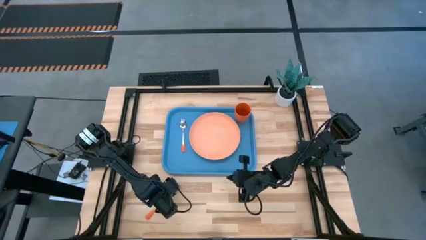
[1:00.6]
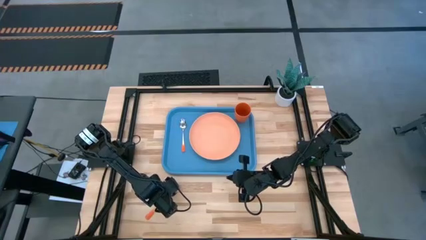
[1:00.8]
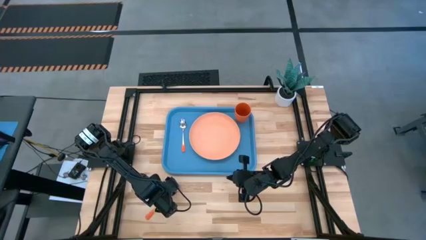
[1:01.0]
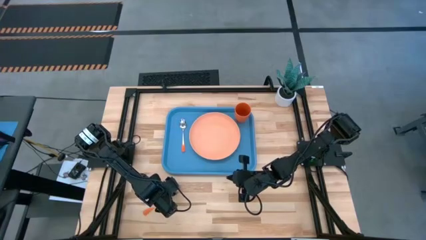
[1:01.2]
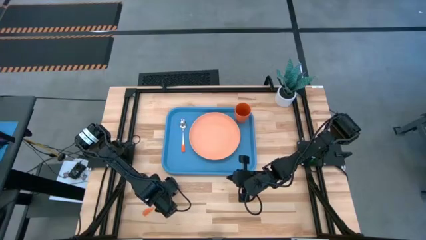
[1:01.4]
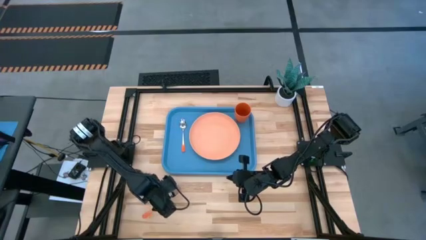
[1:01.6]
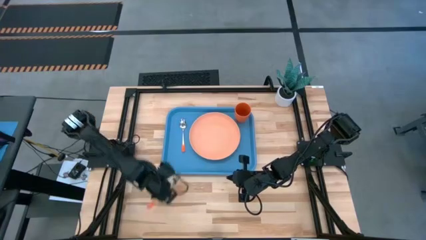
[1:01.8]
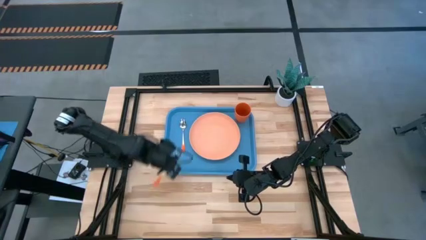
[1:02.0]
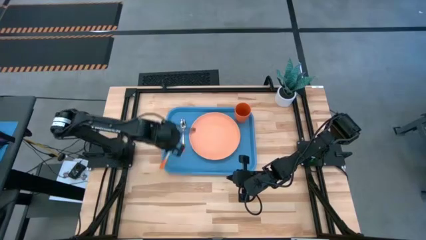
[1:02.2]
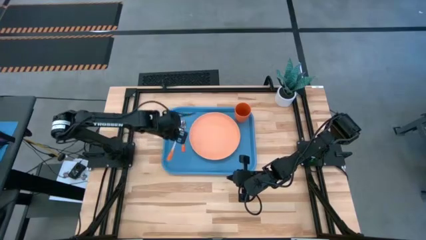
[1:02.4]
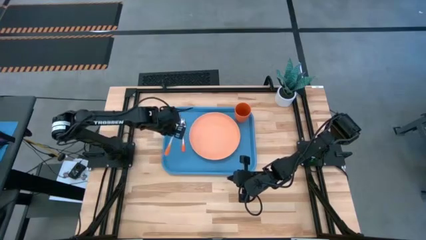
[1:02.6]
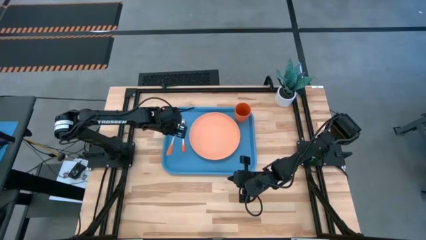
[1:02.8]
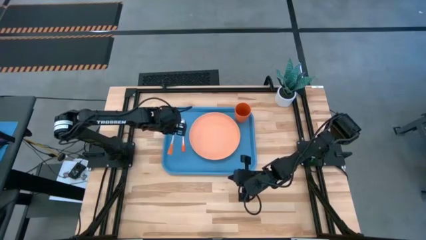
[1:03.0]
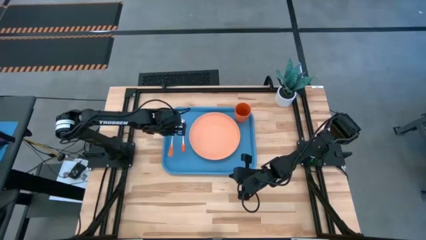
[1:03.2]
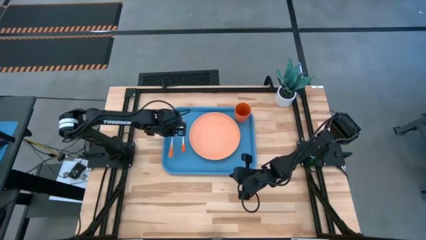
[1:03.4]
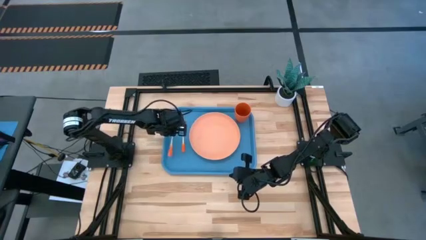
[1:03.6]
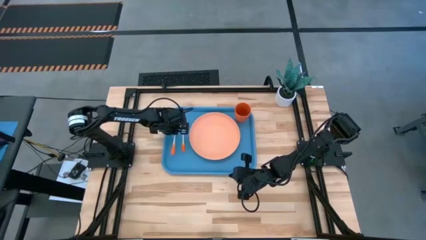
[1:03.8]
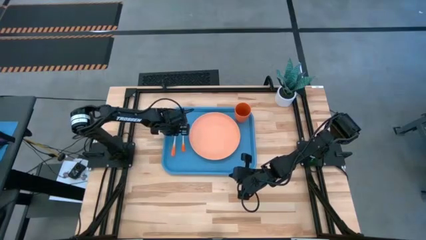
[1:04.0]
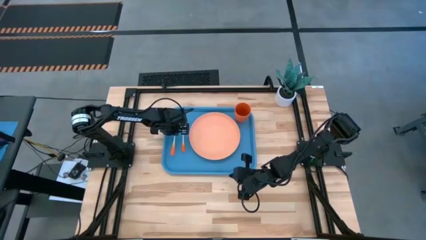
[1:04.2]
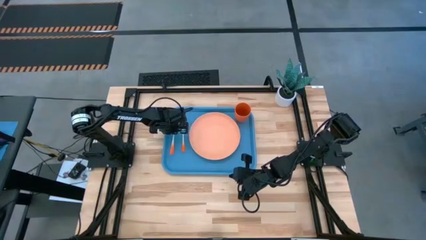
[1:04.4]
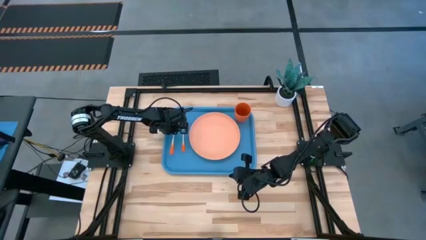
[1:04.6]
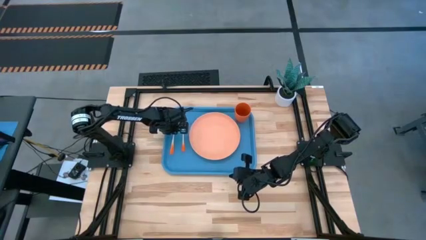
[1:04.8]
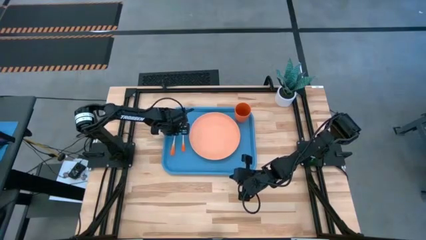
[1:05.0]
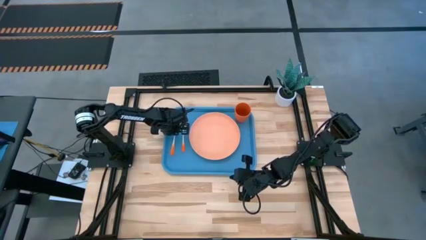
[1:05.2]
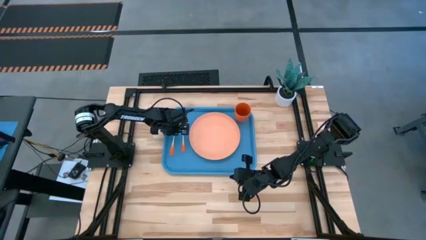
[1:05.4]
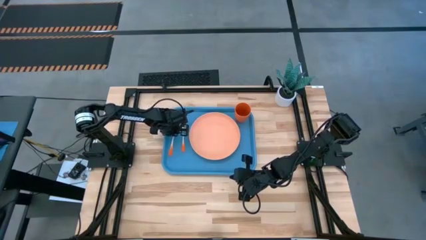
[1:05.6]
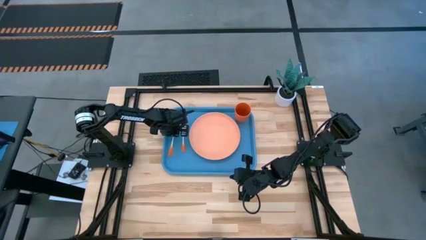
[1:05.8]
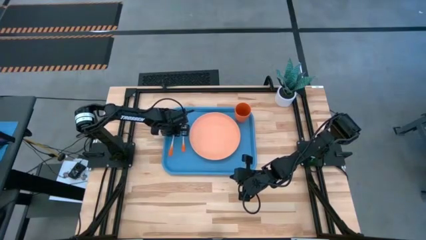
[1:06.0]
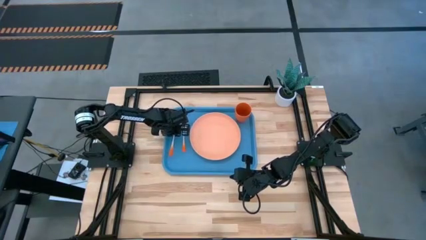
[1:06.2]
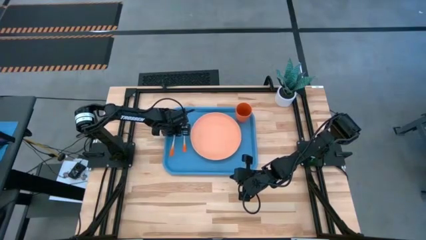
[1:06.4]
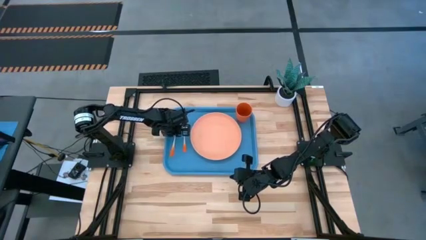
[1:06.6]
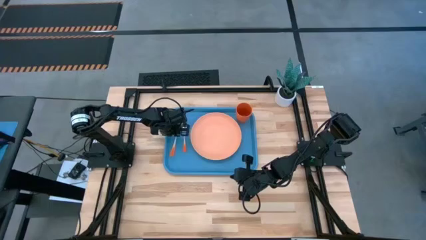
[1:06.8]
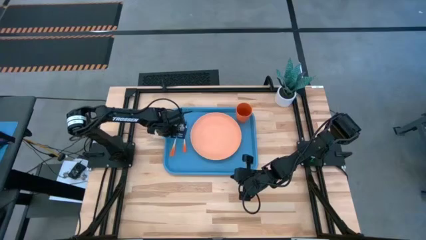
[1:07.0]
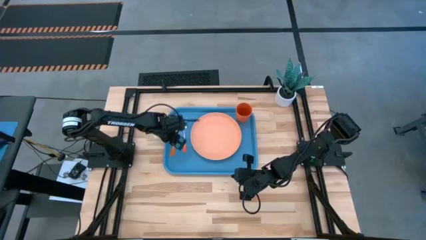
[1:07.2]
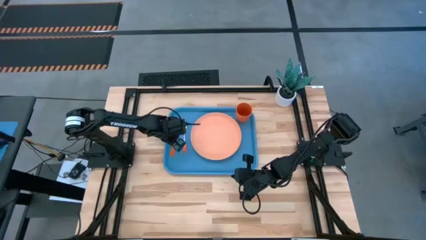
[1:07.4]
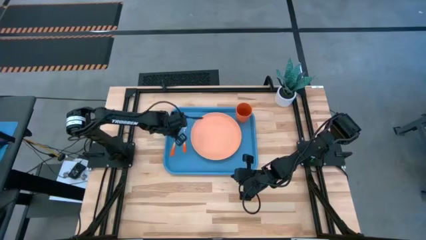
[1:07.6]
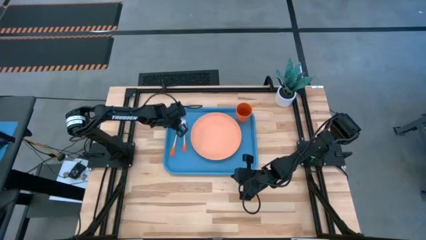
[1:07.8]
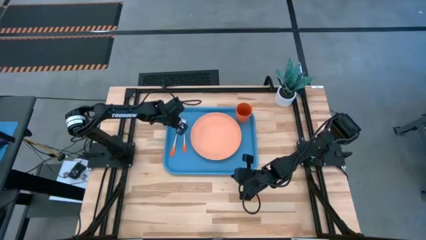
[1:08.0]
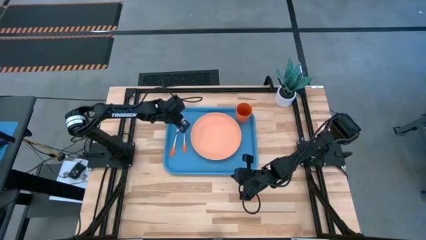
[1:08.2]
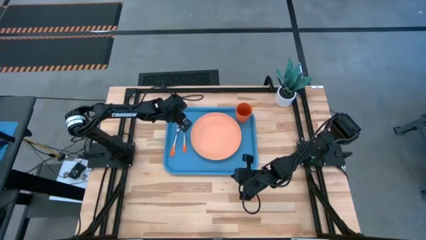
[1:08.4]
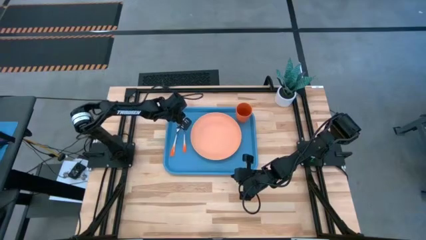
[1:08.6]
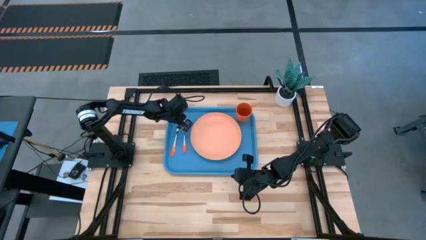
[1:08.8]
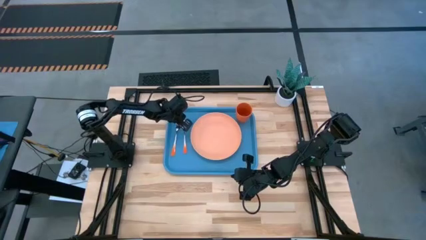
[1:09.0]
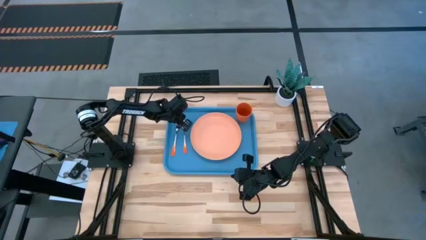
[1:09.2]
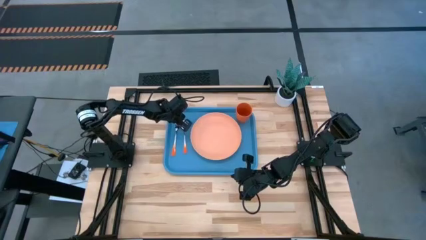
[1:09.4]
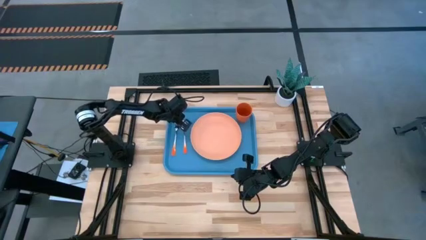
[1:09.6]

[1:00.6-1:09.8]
Task: Pick and place plate/cup/fork/spoon on tray
Put the orange fork on the blue tray to the left of the orange spoon

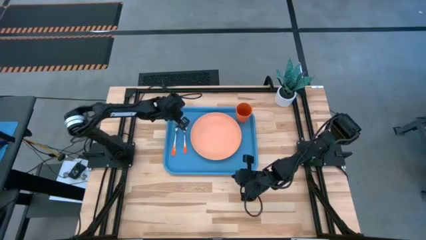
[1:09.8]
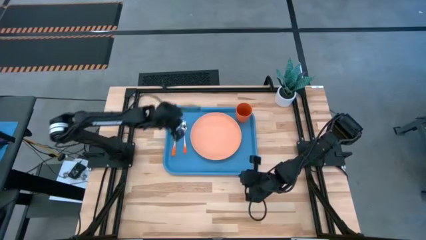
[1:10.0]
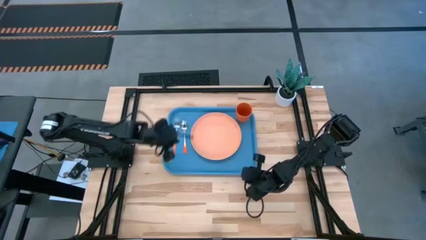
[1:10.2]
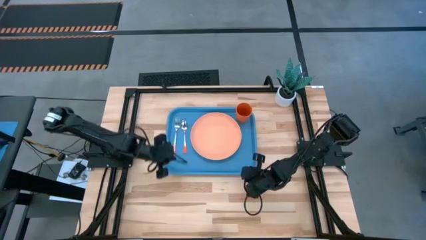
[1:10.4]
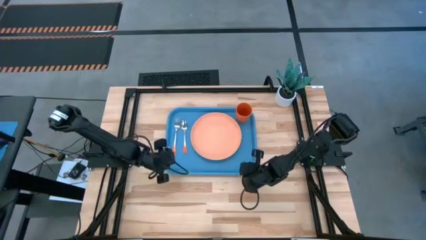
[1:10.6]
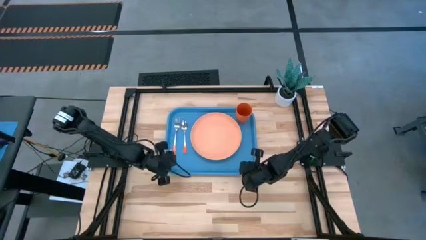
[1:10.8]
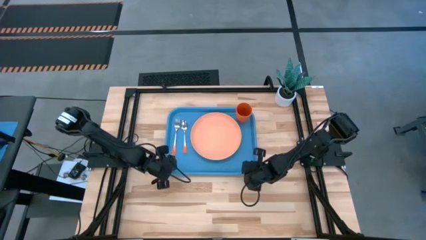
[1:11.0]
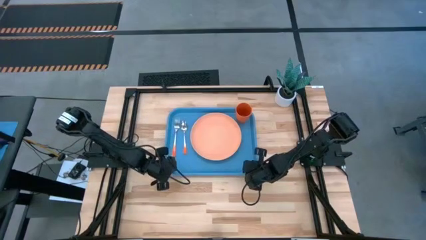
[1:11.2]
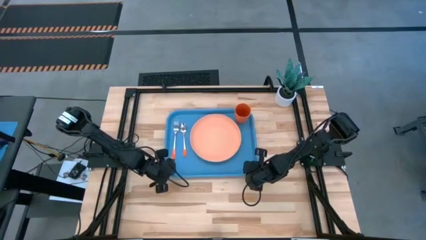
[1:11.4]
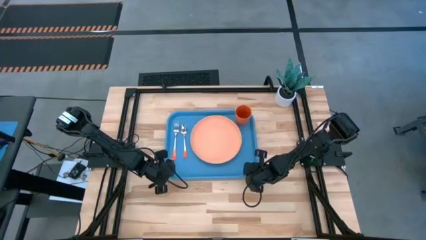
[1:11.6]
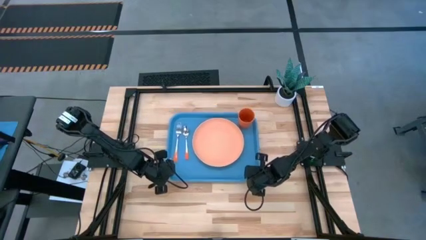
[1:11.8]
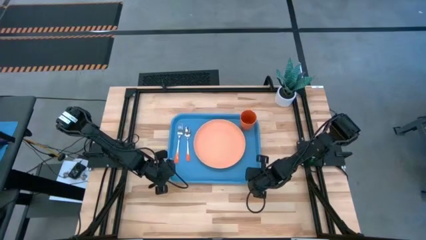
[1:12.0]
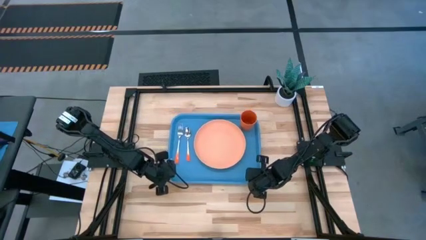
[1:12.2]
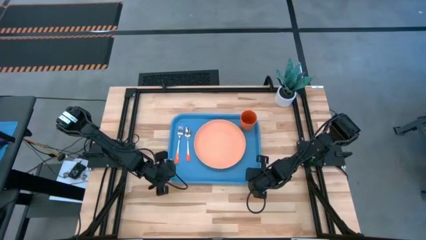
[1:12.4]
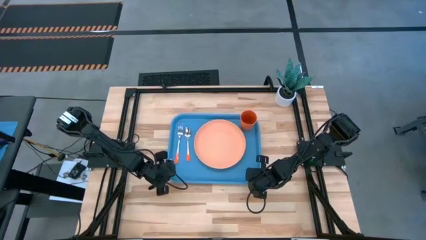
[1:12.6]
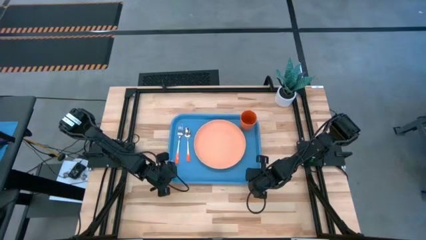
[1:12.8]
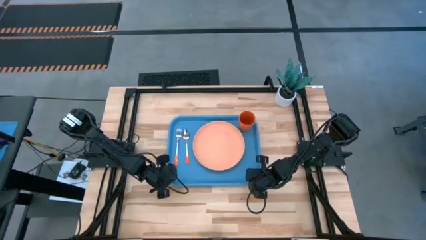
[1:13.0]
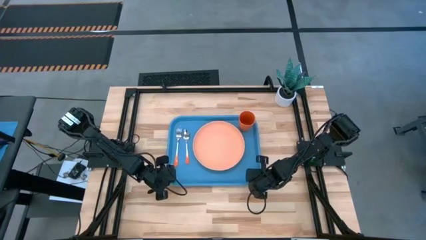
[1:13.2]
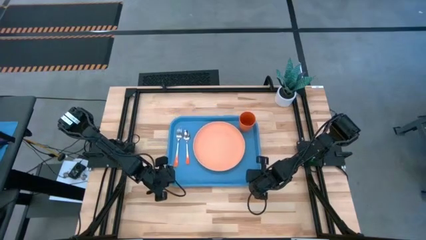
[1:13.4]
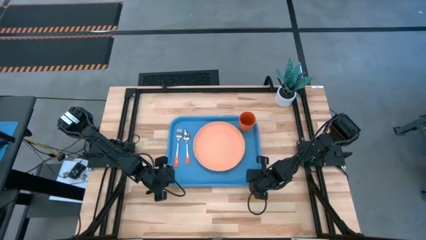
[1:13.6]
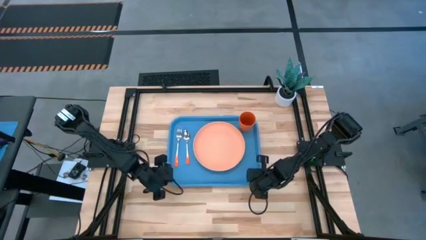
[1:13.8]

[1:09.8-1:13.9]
Adjust the blue tray

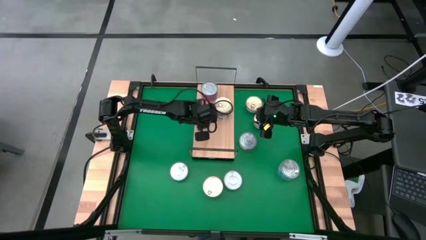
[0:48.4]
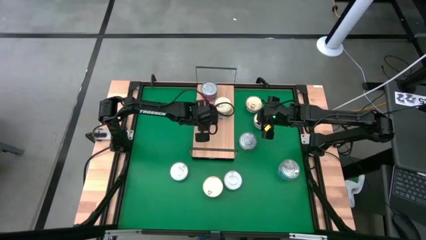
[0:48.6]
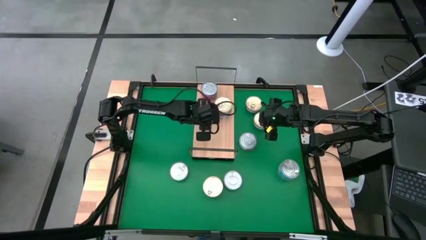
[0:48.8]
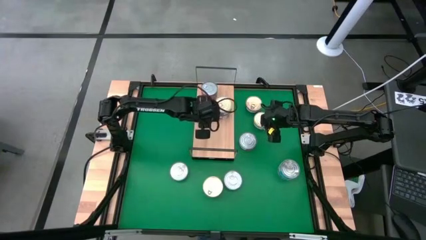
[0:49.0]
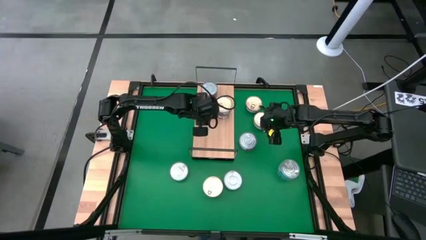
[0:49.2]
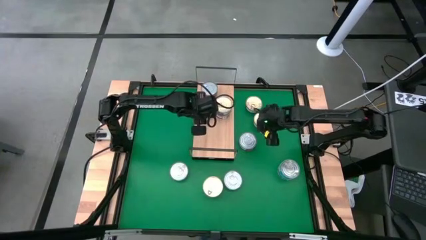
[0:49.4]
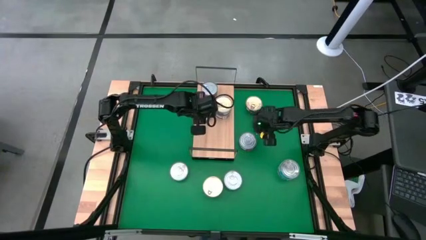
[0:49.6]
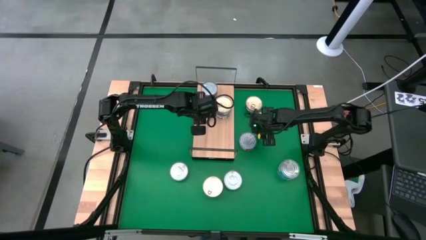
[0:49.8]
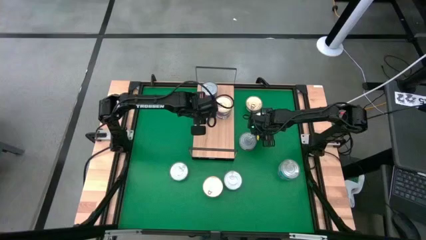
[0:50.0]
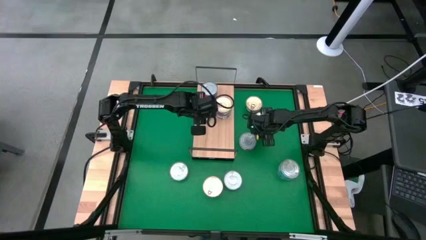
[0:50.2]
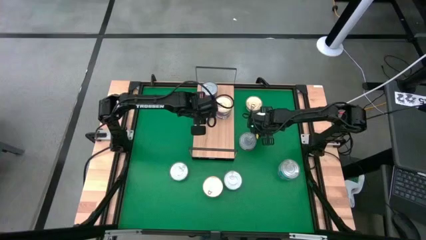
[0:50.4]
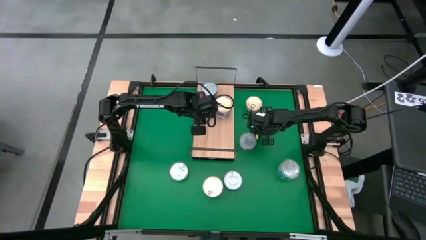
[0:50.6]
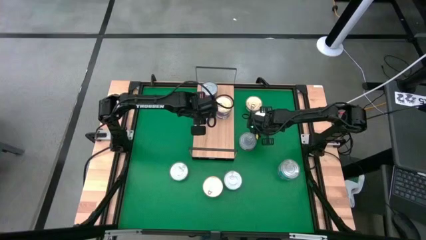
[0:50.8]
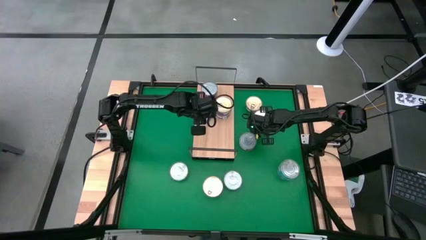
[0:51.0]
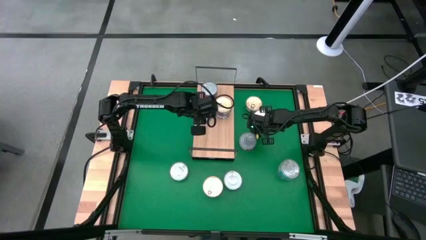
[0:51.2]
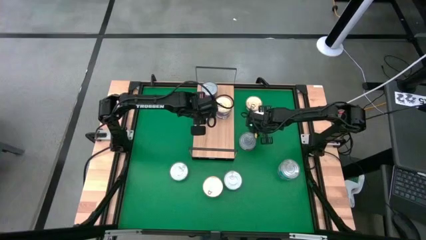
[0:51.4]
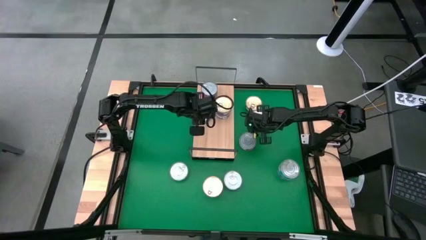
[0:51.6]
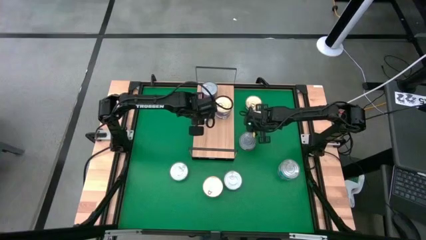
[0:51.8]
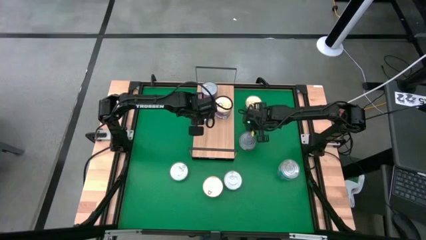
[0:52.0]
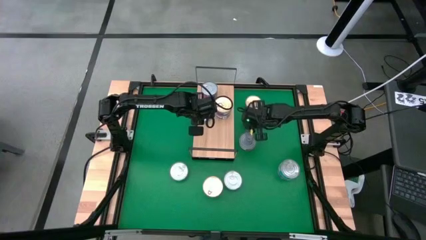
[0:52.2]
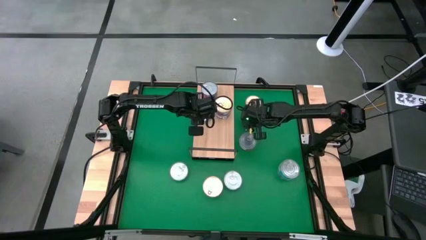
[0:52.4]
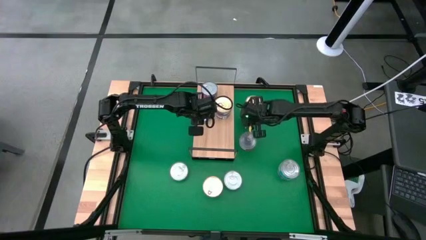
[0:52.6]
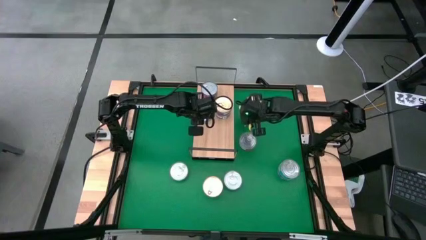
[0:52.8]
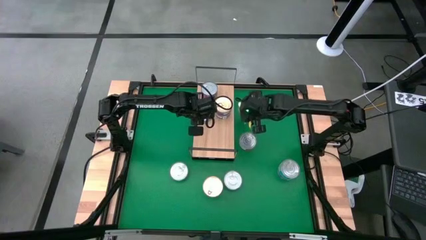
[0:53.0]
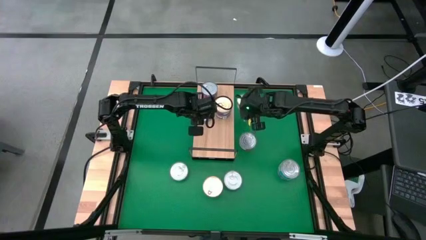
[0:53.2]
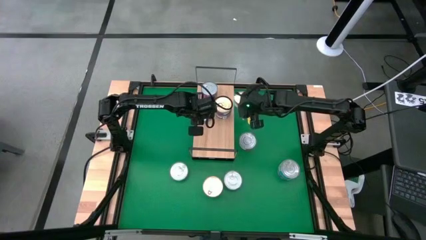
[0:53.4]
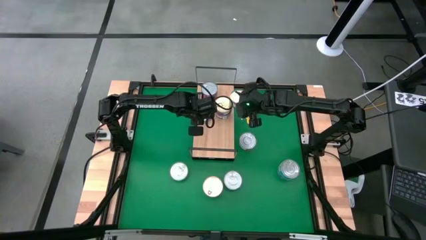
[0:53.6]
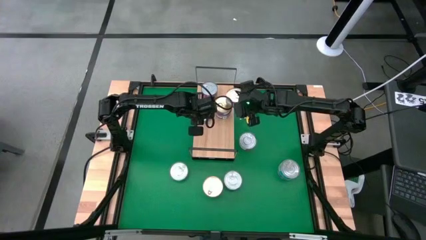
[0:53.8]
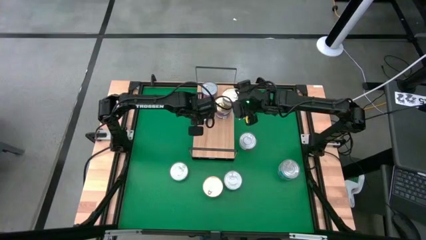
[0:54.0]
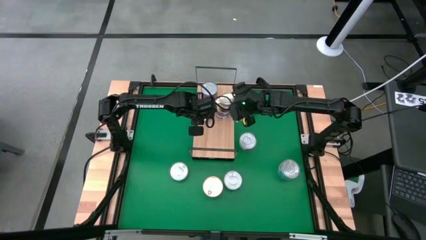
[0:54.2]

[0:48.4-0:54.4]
Task: Stack canned seafood by type on shelf
Stack the dark blue tuna can on top of the dark blue tuna can on the shelf
